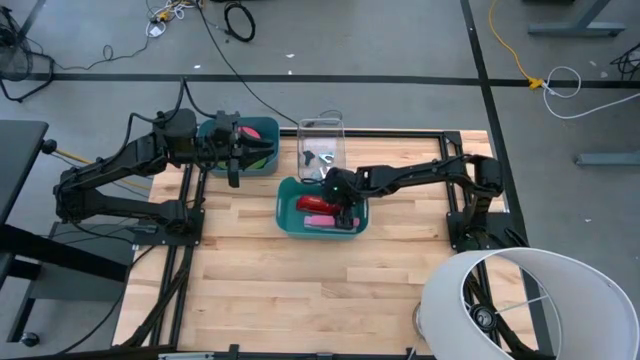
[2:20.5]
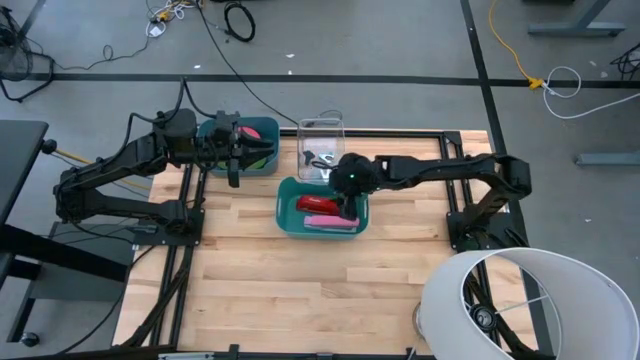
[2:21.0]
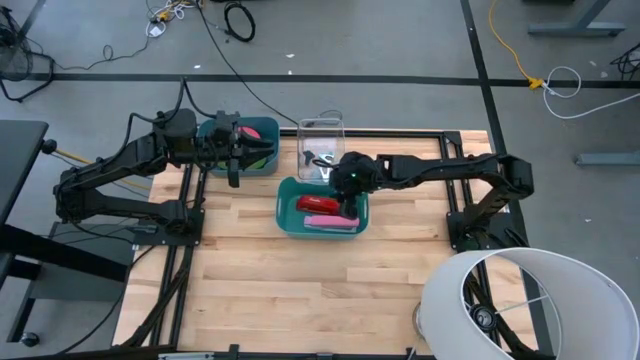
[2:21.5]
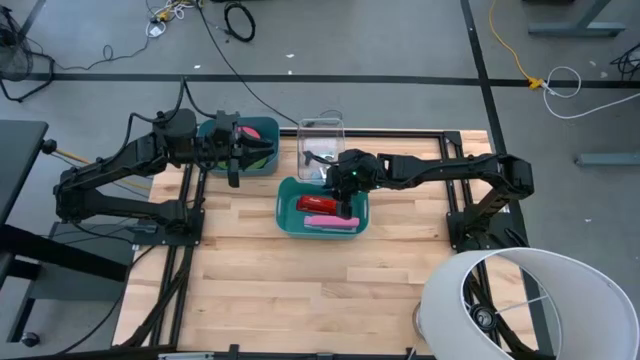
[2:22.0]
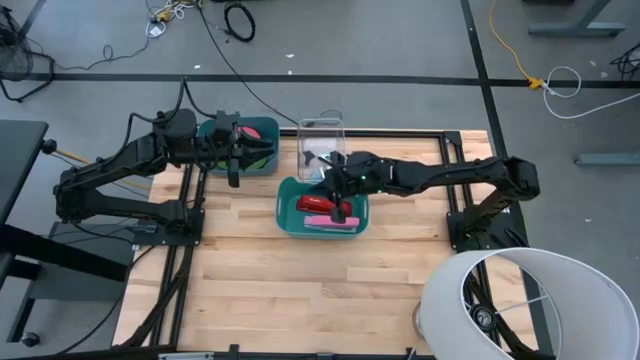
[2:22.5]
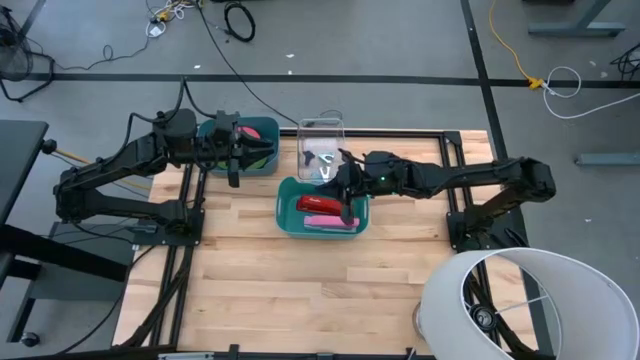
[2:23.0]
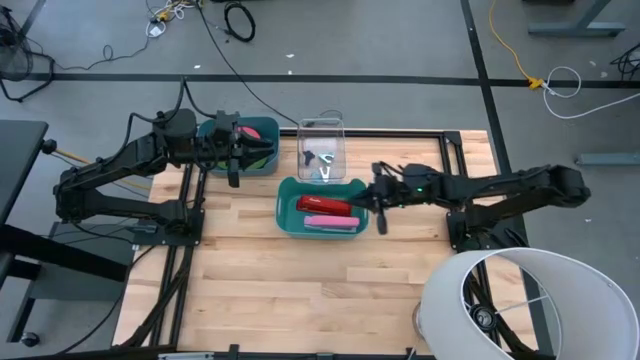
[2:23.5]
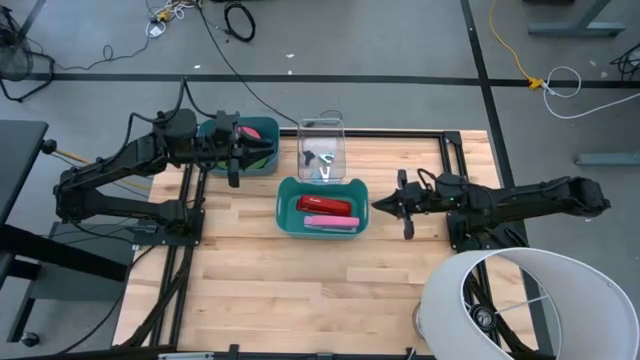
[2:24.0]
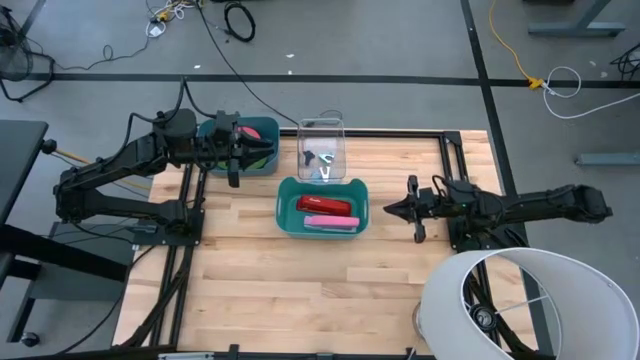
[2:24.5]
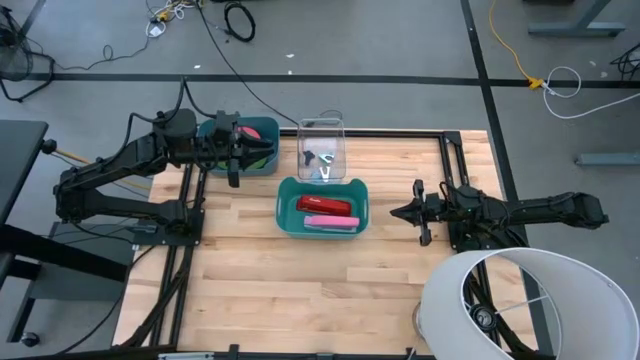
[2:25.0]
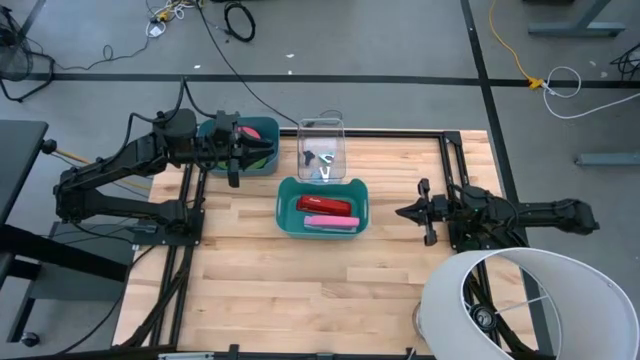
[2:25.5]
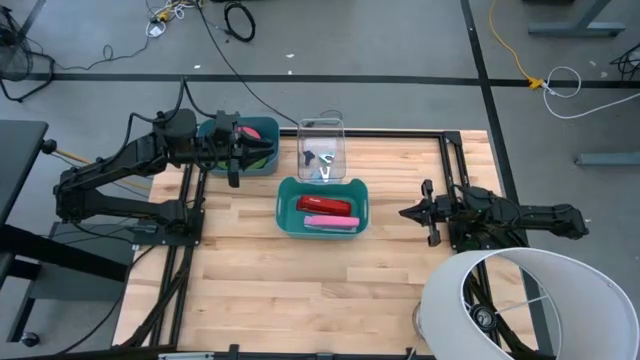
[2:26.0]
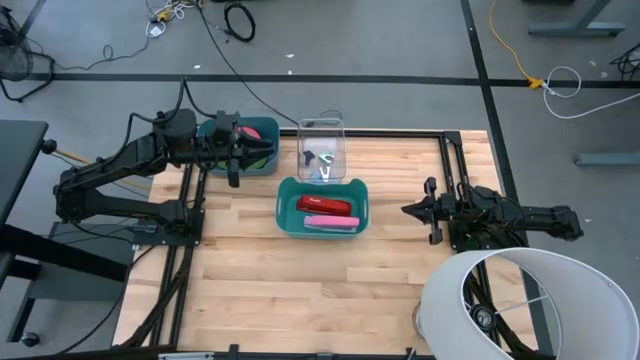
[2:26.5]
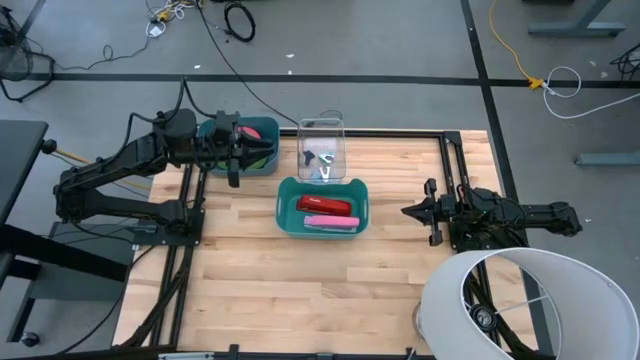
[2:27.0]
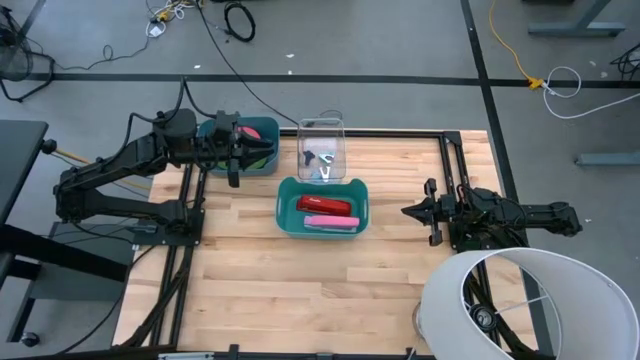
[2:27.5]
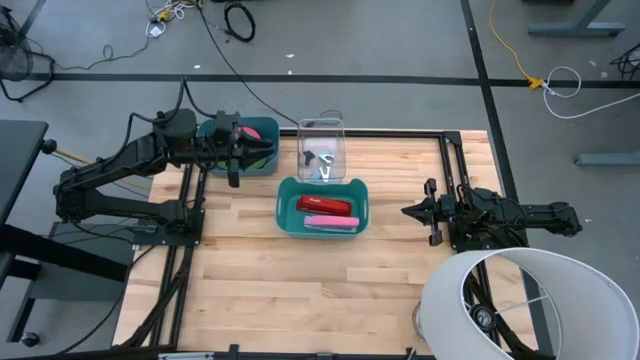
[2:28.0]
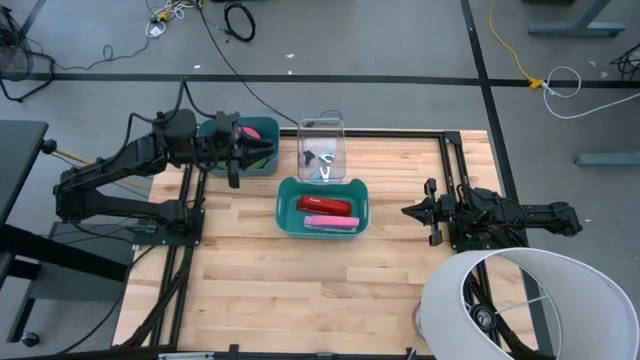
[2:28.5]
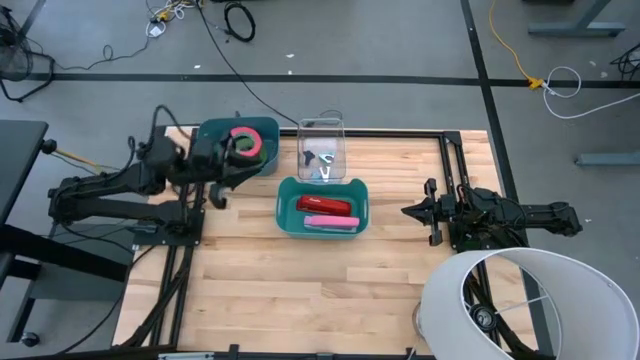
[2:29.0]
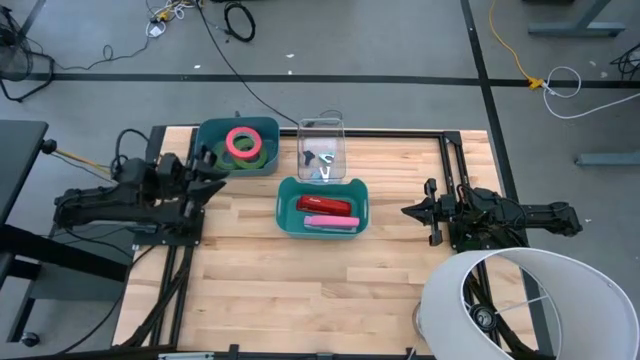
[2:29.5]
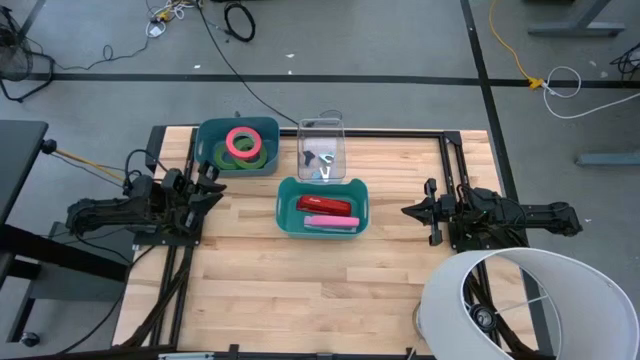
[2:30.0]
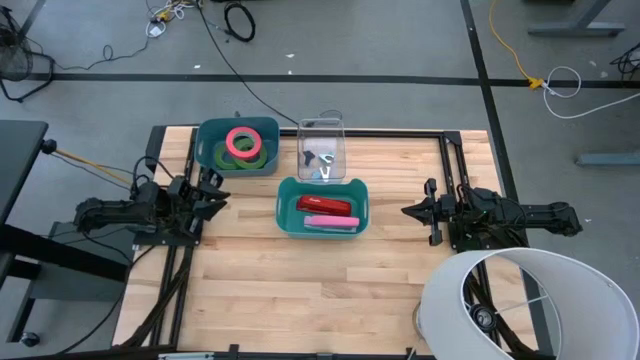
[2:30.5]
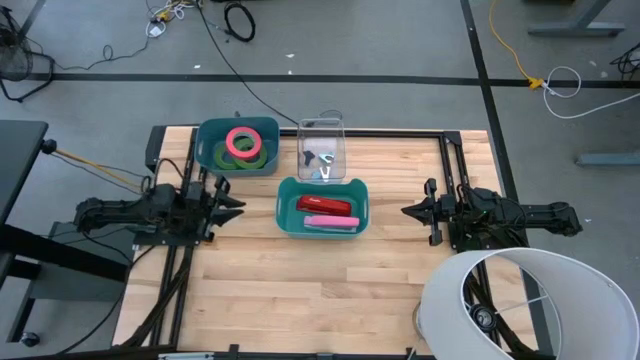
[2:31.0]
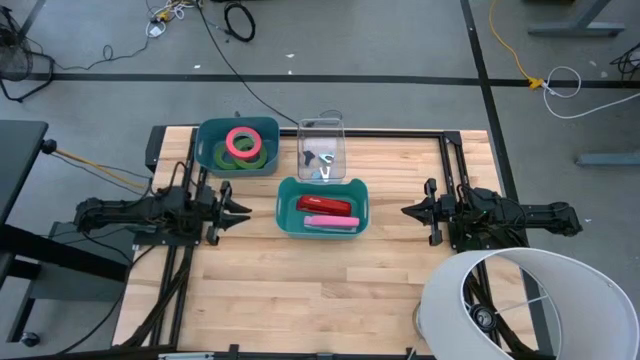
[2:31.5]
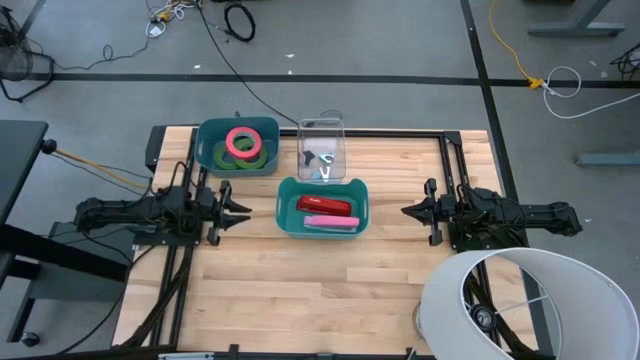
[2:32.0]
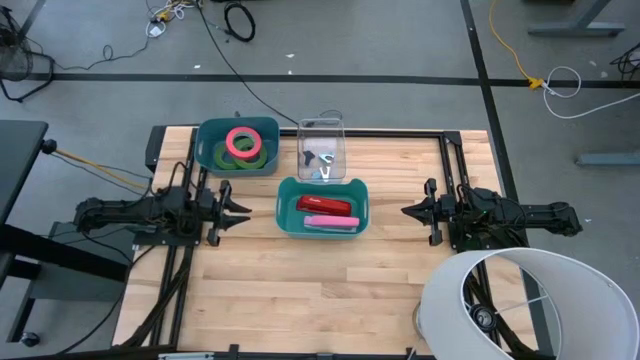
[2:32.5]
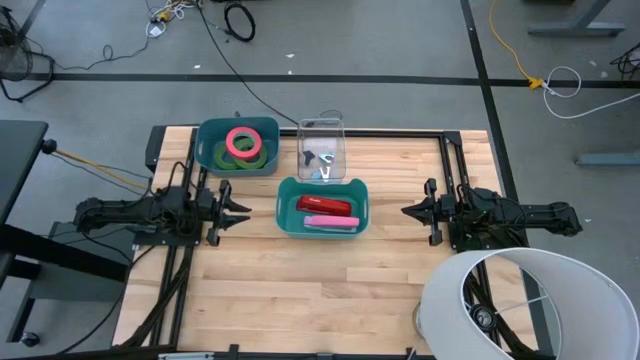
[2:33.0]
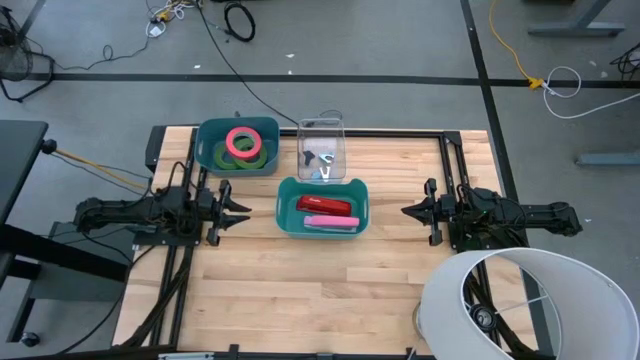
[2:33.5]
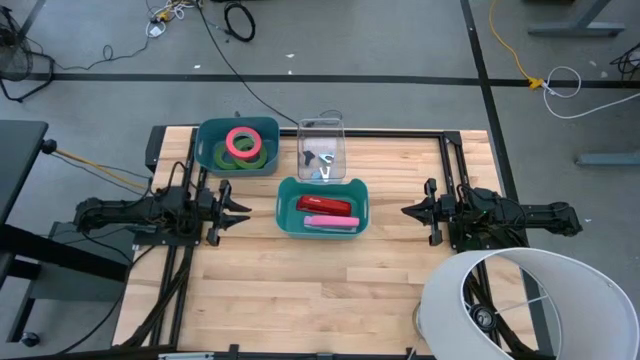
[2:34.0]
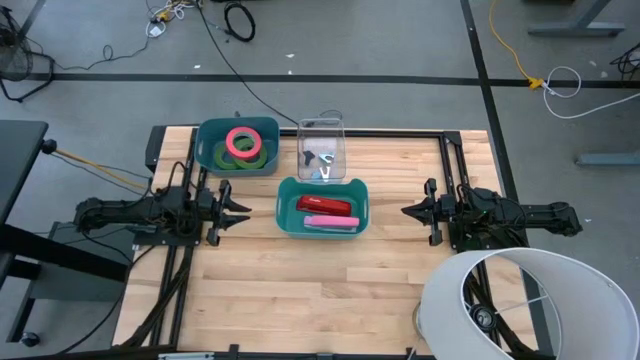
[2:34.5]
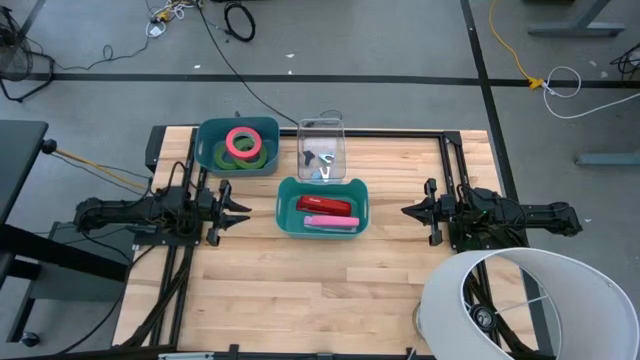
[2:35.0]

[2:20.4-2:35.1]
Task: Pick and place Stapler, Stapler remover, tape
Return to Home Position

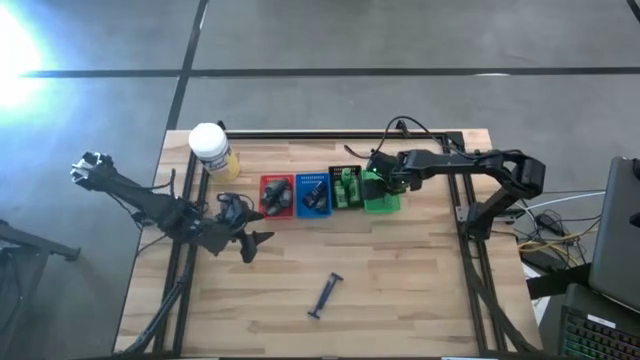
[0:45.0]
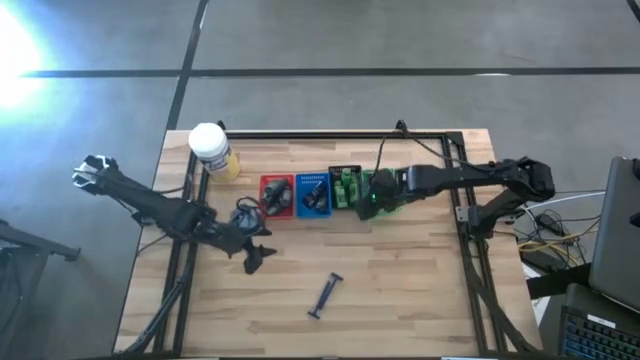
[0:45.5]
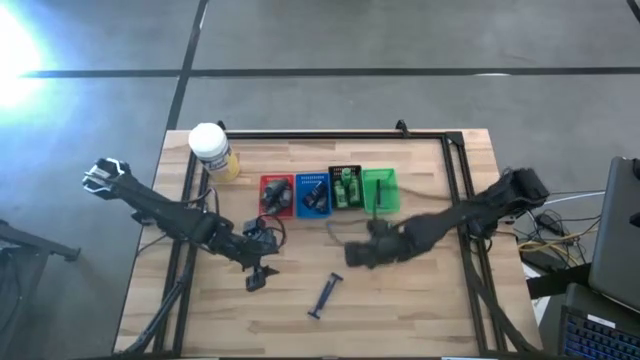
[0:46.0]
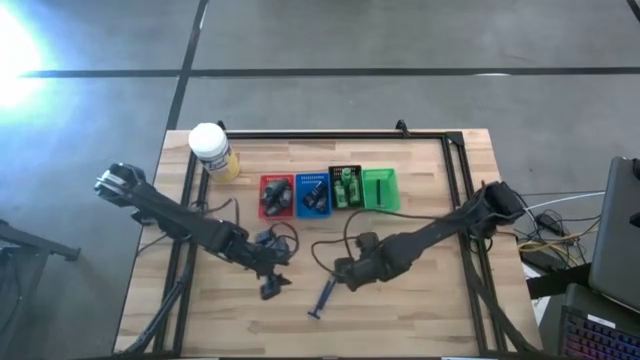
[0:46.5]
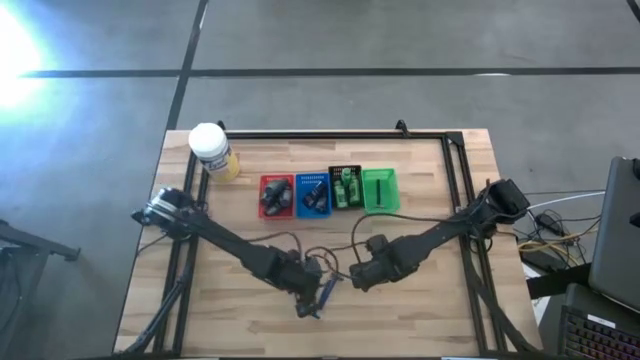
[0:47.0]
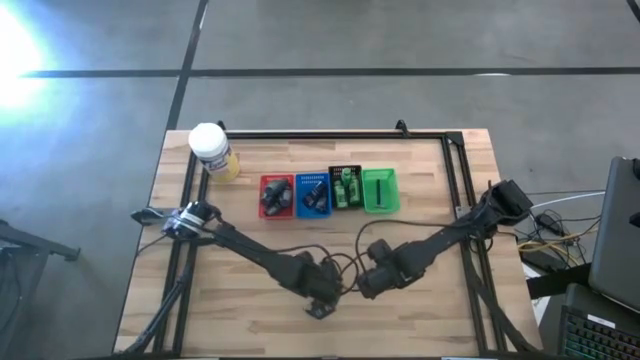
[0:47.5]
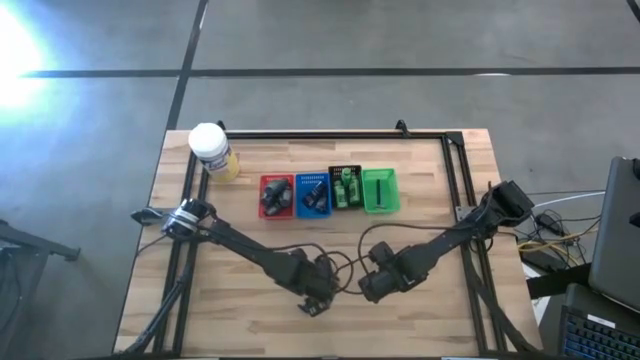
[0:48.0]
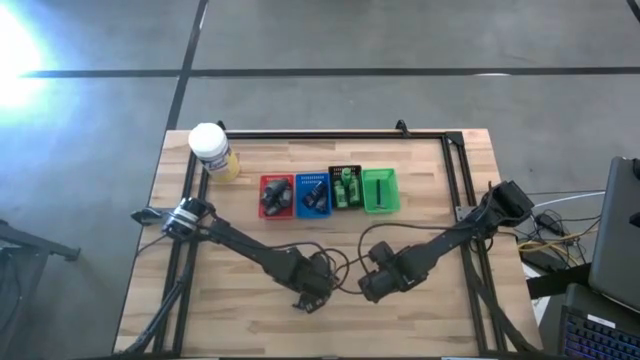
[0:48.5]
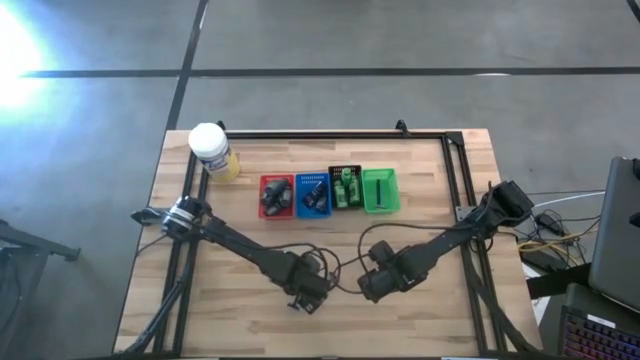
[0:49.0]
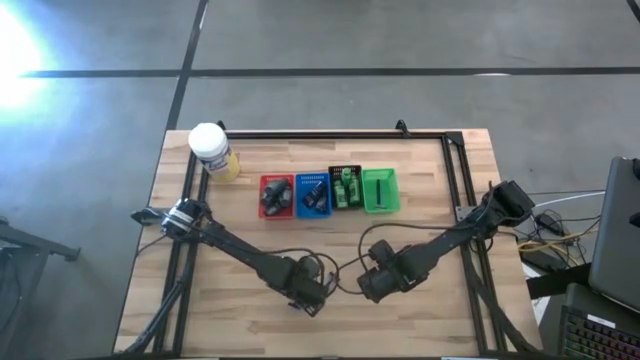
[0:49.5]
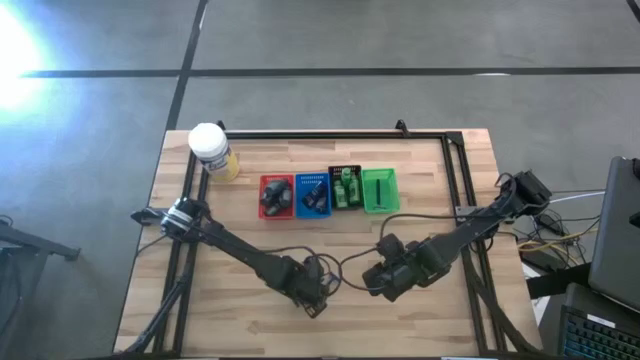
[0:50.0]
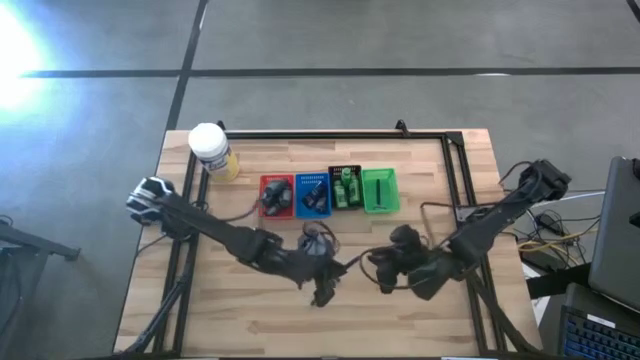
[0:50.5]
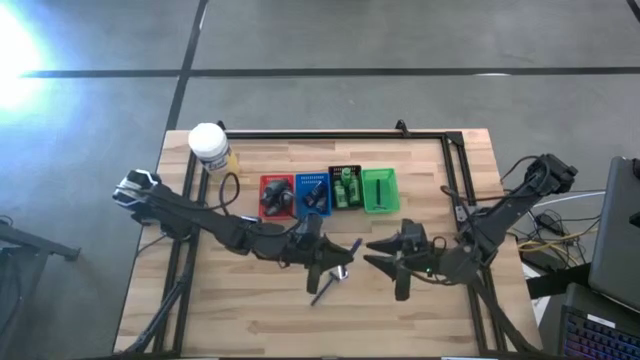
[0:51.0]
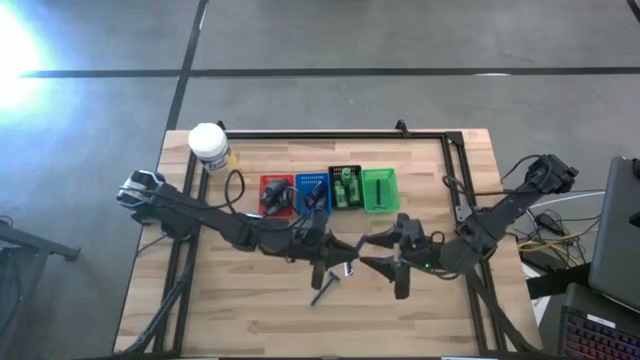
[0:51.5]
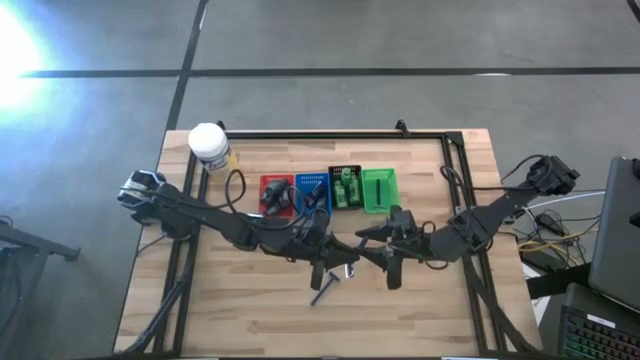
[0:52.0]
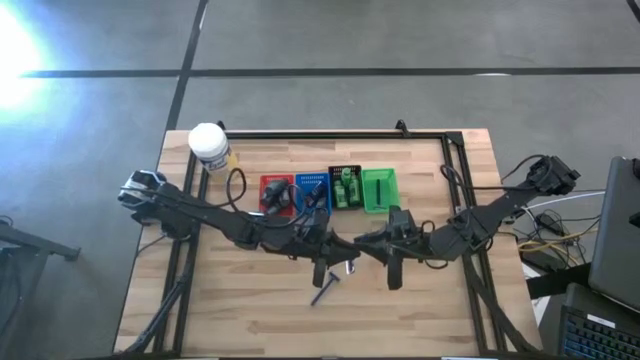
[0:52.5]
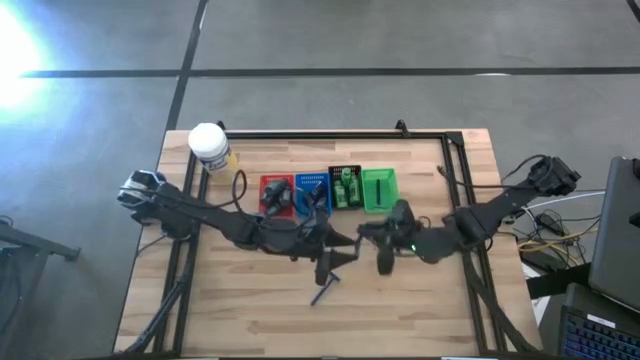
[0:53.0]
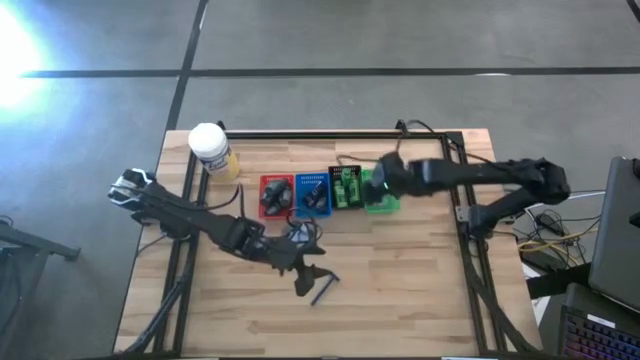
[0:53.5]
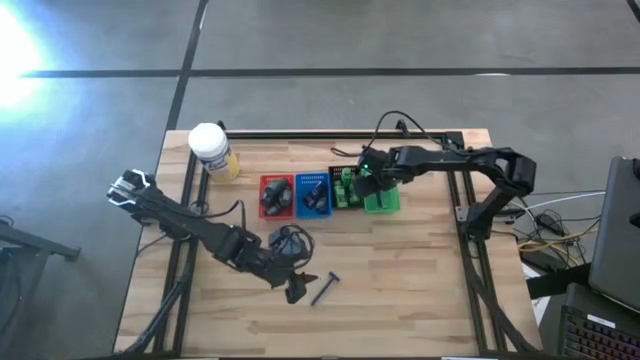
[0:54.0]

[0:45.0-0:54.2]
Task: Pick & Place Travel size toiletries
Put the blue razor into the green bin
